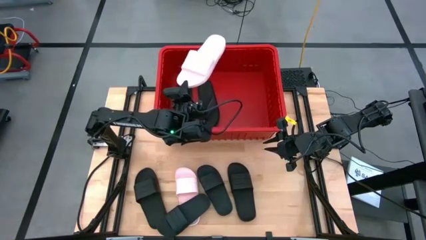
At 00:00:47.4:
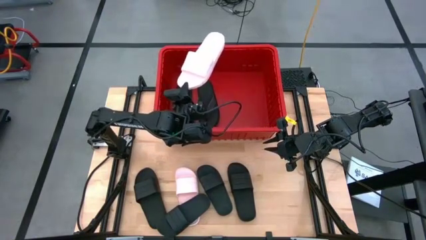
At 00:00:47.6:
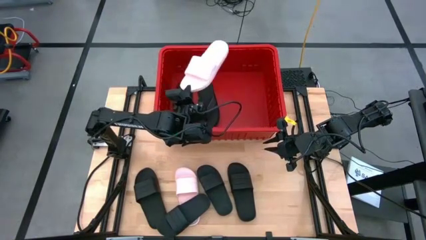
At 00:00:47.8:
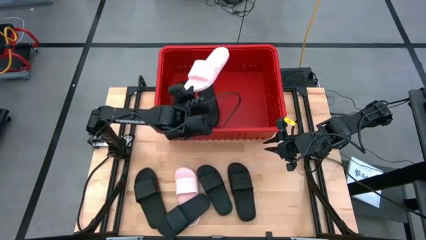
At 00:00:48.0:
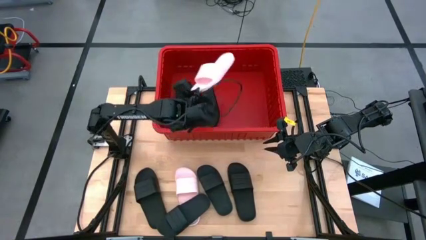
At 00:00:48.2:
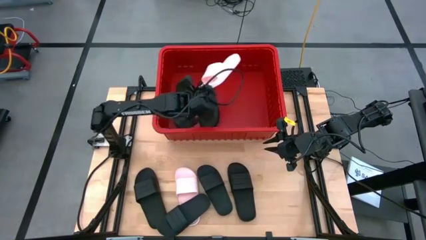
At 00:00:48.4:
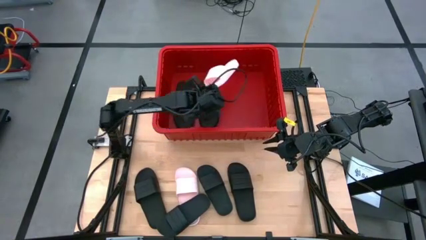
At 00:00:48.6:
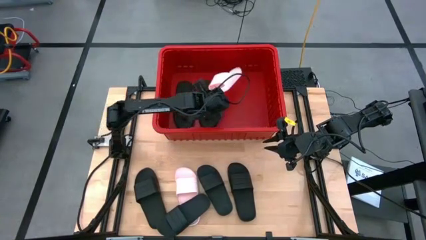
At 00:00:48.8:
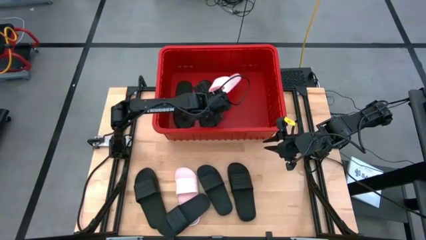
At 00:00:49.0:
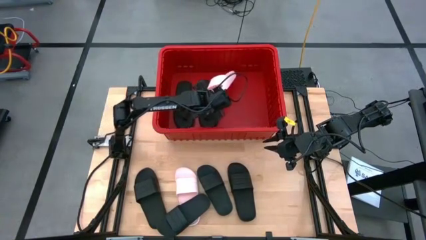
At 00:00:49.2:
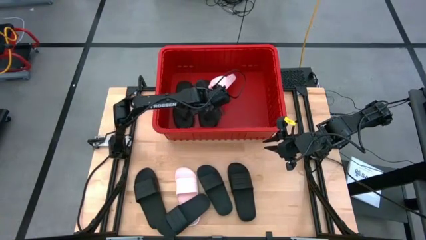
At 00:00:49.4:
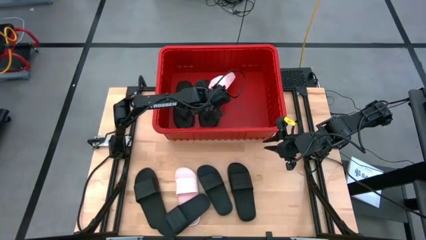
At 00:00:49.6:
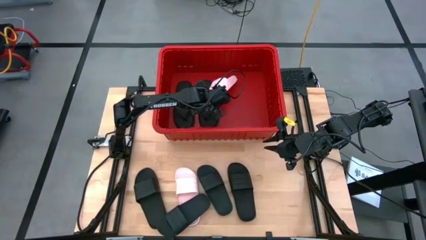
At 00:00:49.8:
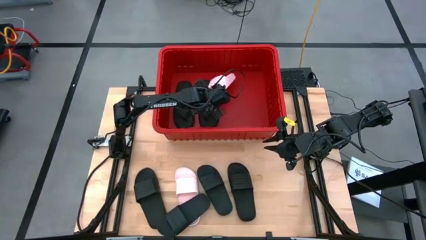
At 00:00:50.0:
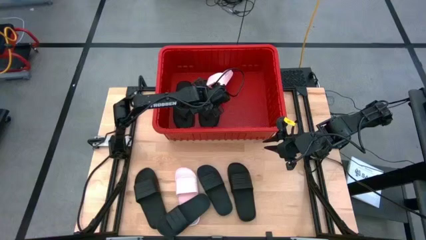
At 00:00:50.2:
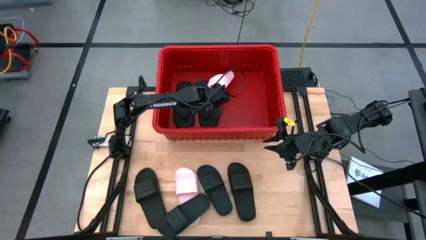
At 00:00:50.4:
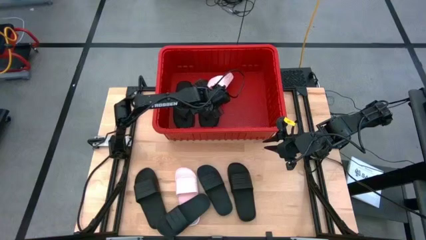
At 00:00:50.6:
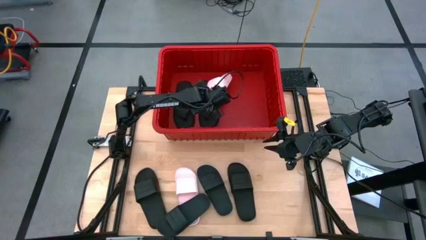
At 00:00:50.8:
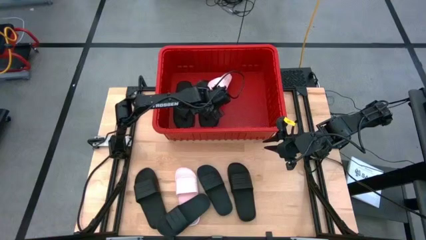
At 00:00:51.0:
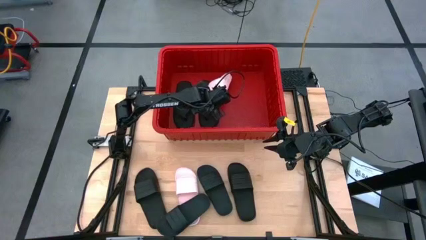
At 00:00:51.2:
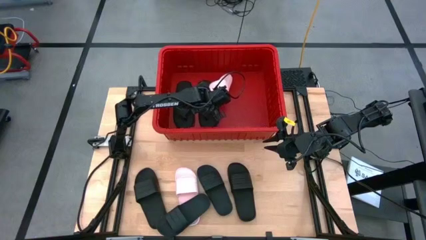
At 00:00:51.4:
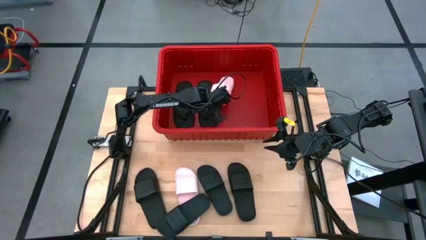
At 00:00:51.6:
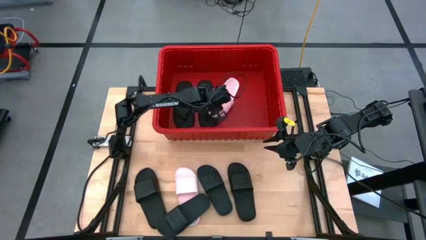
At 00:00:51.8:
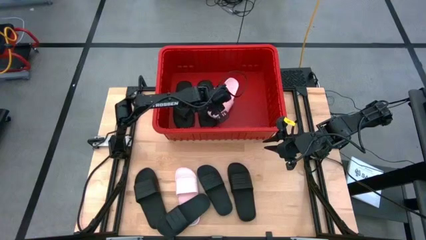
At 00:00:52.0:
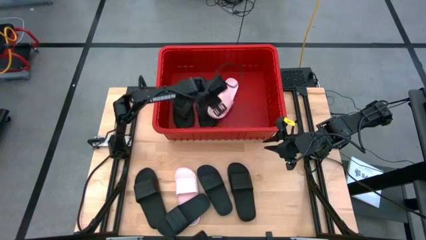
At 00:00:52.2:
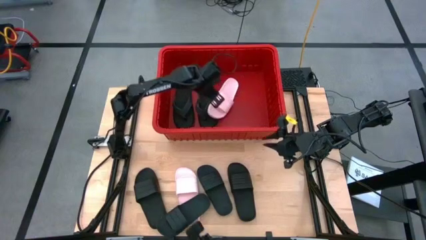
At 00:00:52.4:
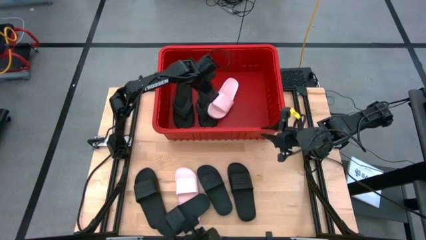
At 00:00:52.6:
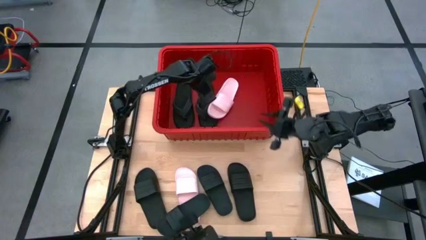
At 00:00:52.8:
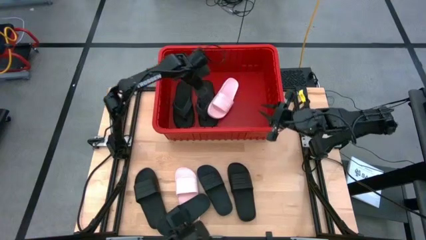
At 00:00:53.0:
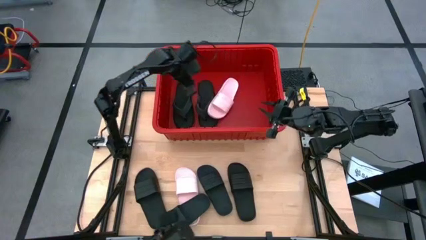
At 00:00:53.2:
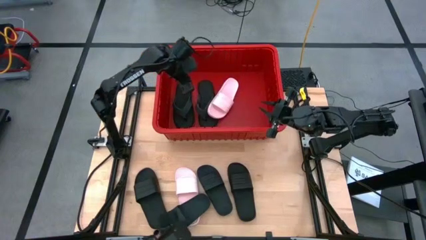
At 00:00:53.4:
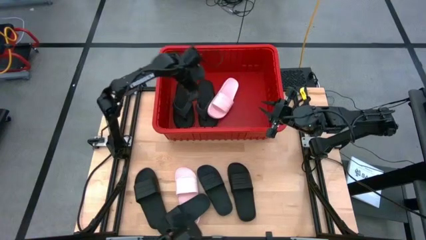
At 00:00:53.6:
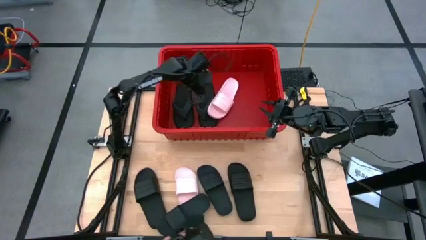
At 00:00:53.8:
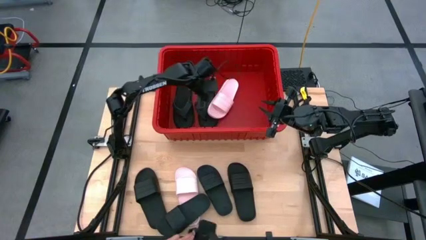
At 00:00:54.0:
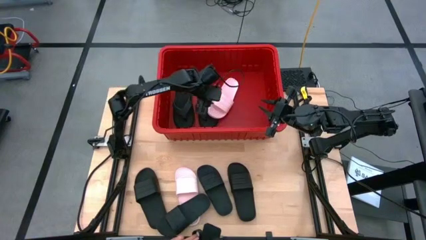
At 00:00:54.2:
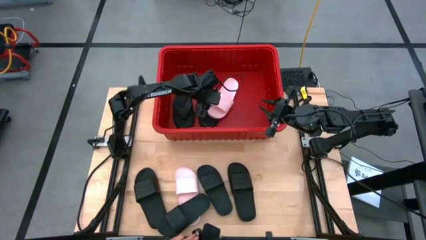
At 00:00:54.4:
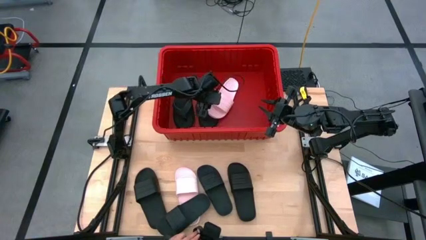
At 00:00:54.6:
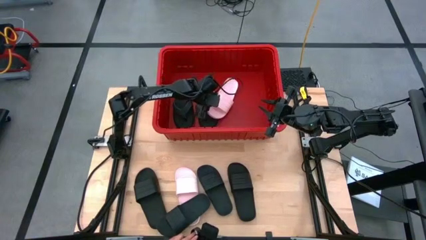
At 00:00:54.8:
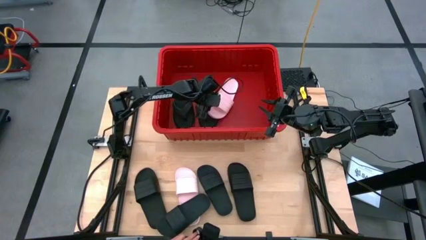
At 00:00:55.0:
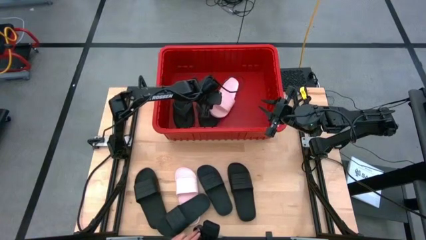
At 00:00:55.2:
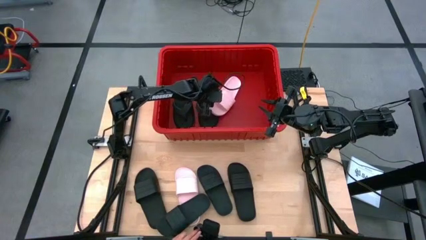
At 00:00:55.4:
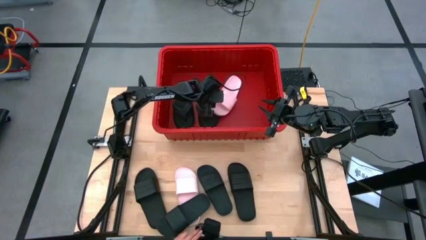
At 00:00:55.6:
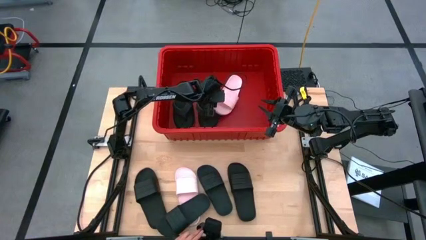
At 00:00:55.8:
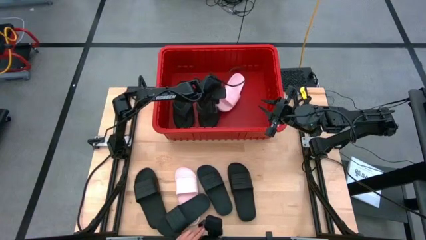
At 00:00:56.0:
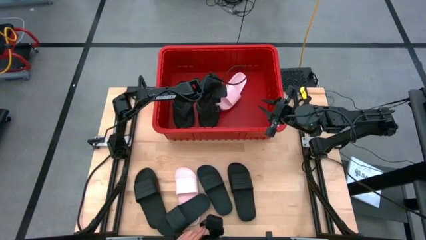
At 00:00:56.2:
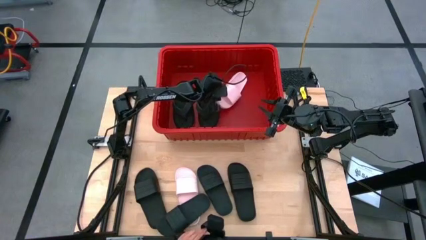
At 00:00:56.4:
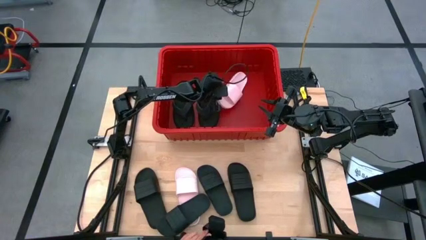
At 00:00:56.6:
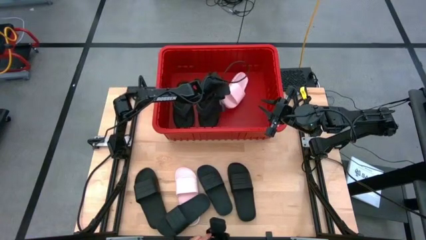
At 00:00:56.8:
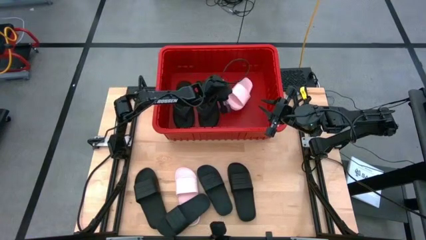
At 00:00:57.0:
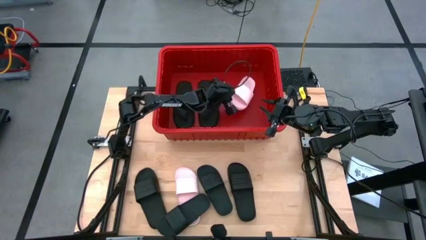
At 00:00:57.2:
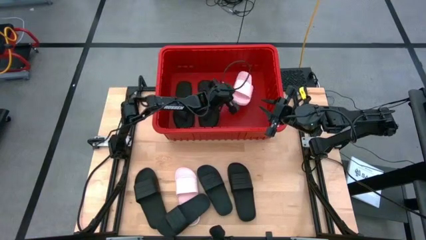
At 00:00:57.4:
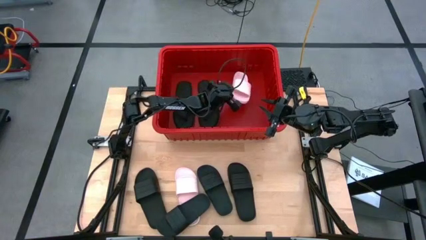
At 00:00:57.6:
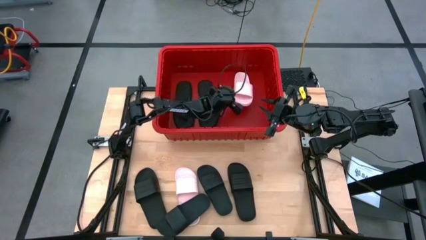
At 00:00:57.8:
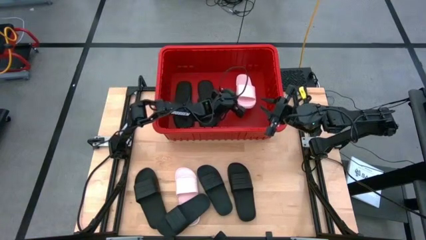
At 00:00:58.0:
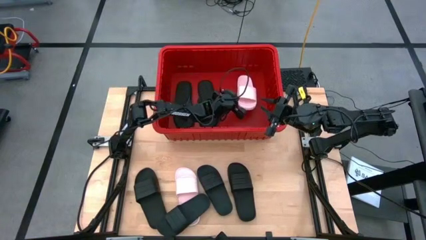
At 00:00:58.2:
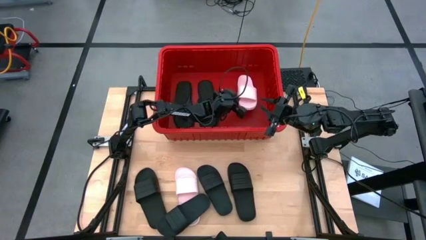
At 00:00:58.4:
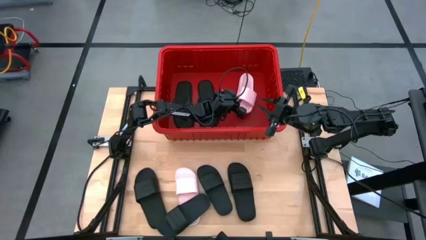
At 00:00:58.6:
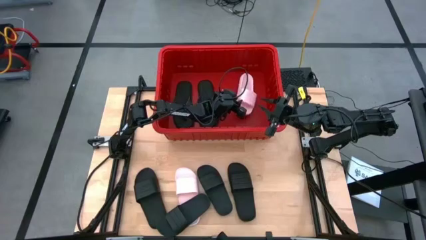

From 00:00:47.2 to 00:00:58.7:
Task: Pick and place slides into bin
Put the pink slide into the red bin

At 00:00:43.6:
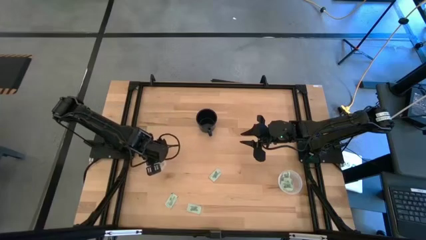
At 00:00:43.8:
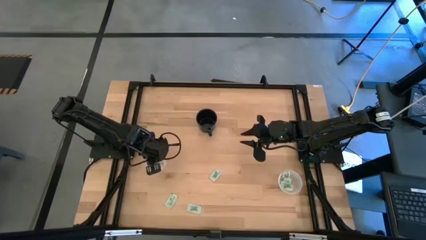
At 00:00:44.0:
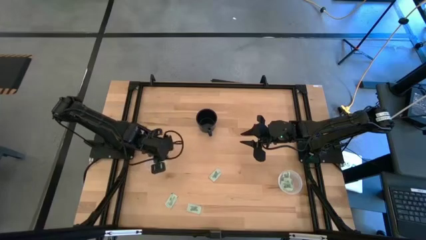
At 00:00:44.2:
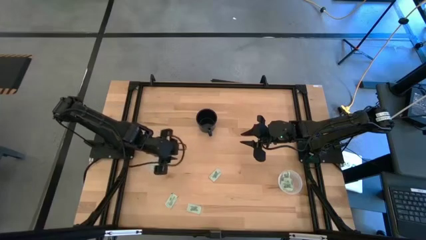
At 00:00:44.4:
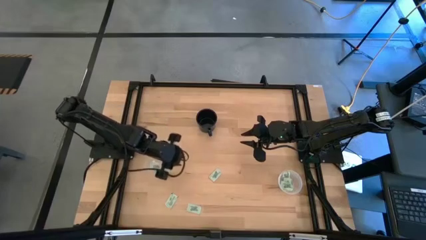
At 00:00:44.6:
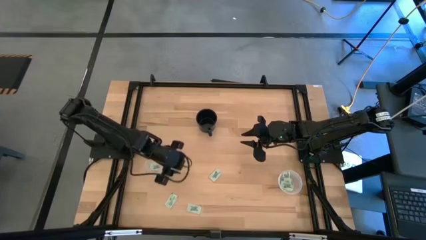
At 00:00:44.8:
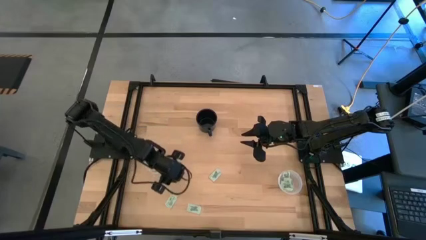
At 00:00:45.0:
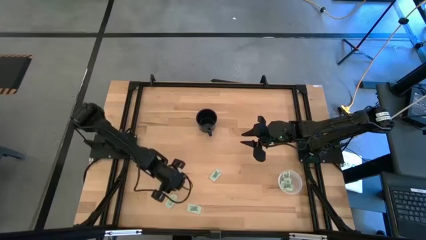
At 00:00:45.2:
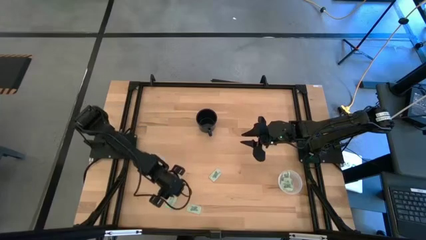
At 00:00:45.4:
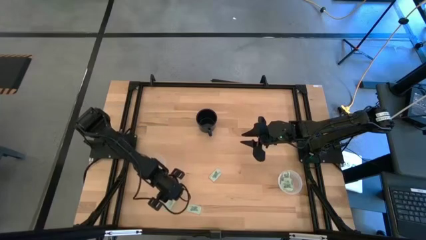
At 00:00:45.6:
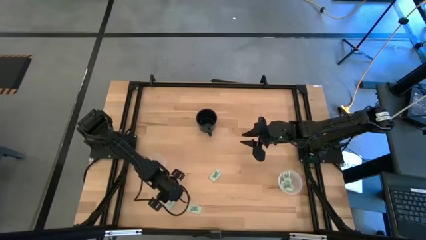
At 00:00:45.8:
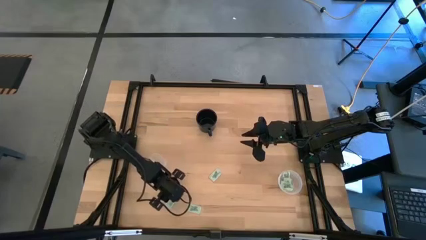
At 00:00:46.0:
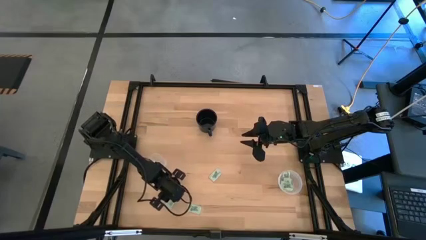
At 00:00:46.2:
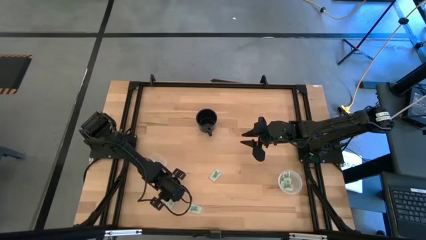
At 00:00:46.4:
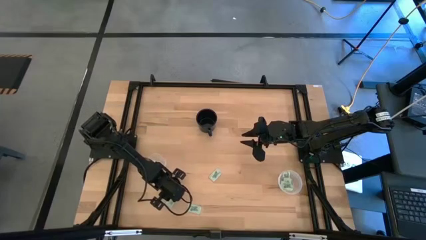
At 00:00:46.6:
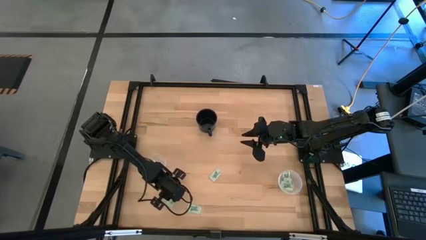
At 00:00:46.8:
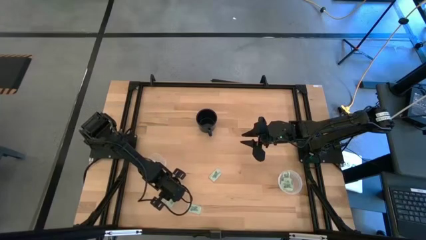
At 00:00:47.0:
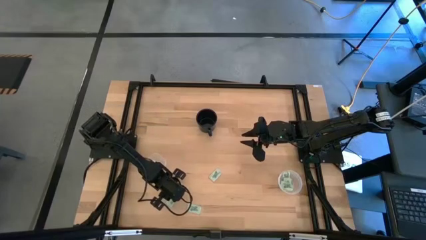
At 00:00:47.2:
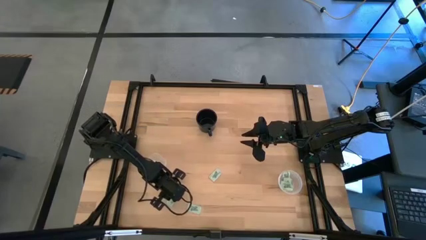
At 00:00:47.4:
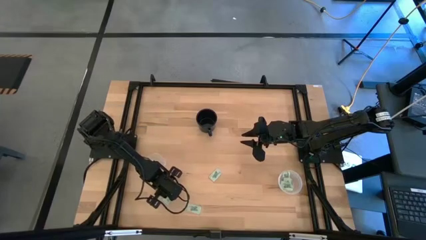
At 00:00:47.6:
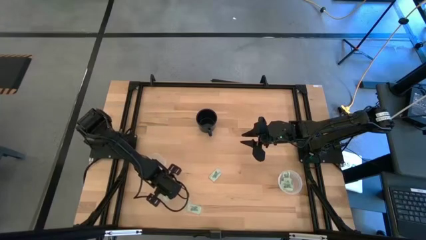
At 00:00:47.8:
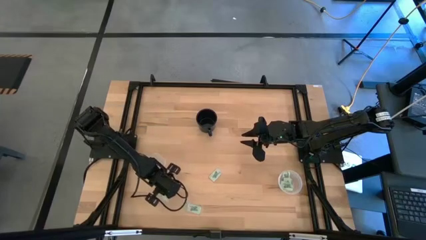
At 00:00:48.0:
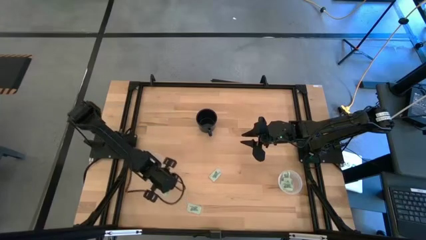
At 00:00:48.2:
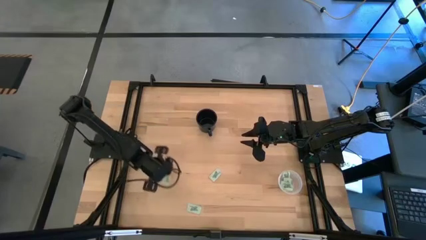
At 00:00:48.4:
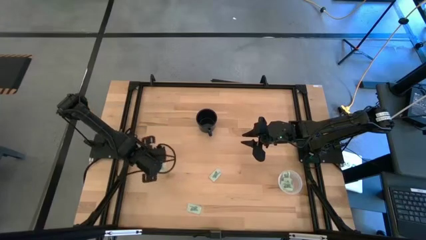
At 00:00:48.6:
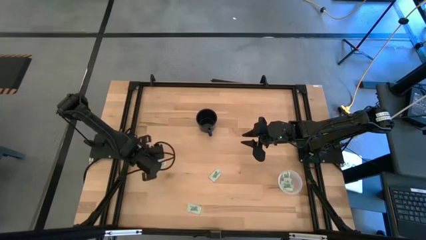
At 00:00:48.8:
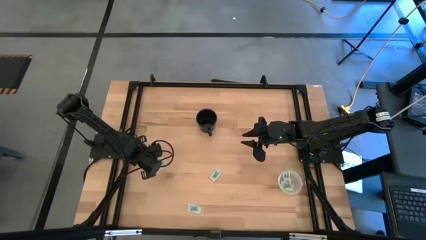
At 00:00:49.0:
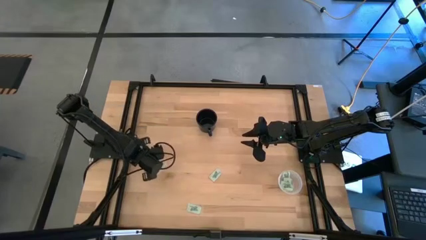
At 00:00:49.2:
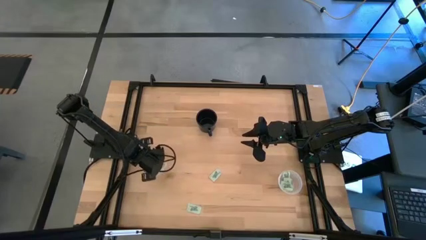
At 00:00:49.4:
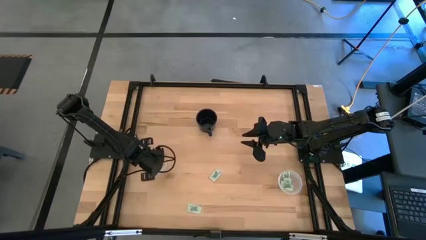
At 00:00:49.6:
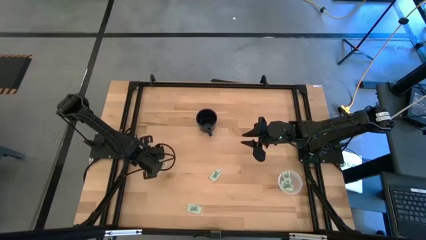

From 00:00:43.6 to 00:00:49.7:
Task: Pick and place Stevia / Truvia into bins
Put the stevia packet into the left transparent container
